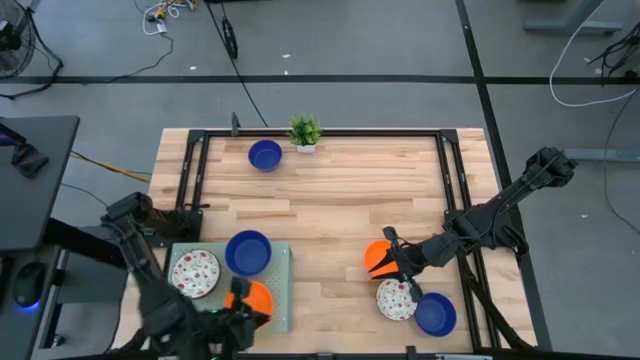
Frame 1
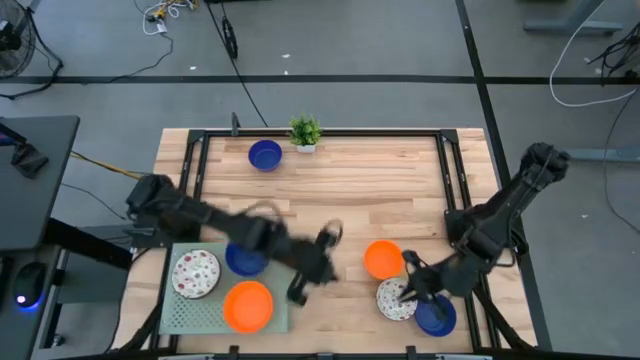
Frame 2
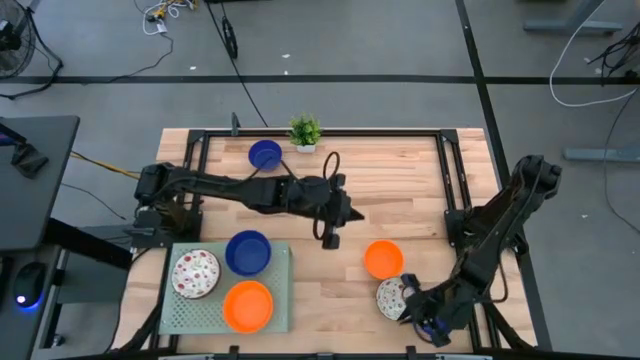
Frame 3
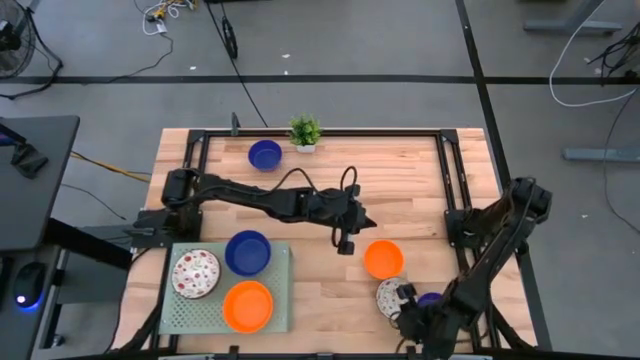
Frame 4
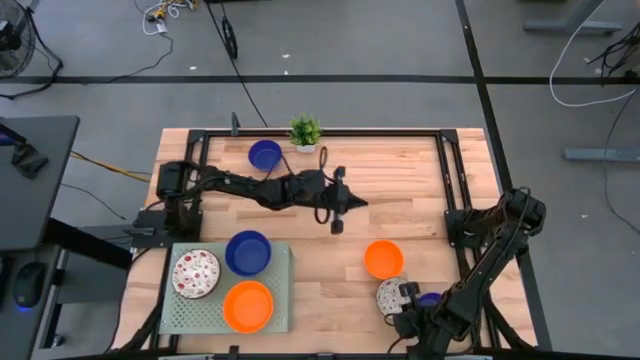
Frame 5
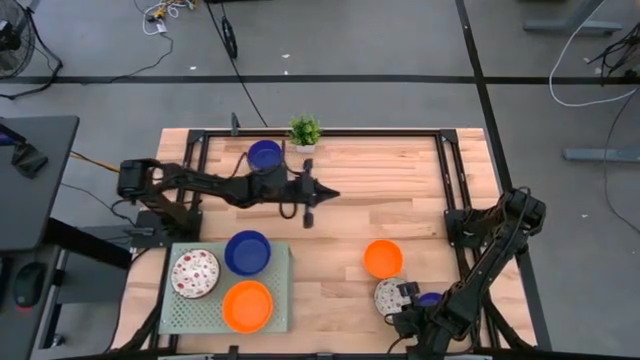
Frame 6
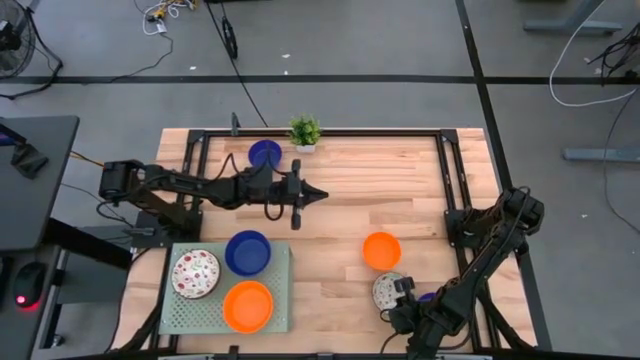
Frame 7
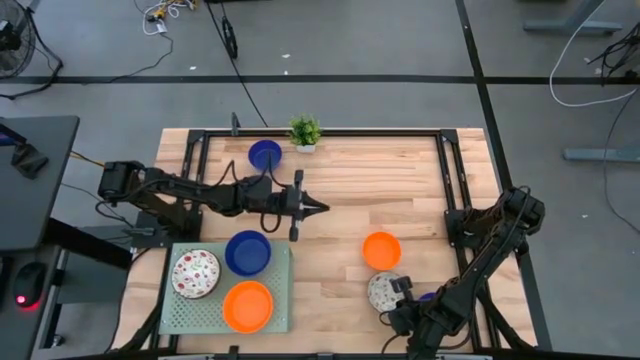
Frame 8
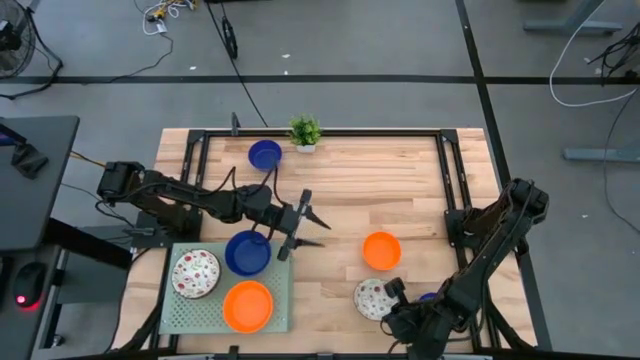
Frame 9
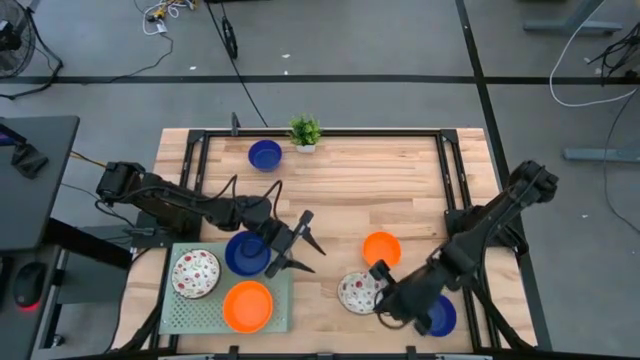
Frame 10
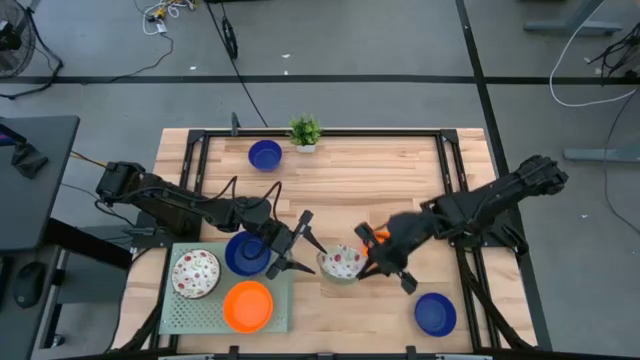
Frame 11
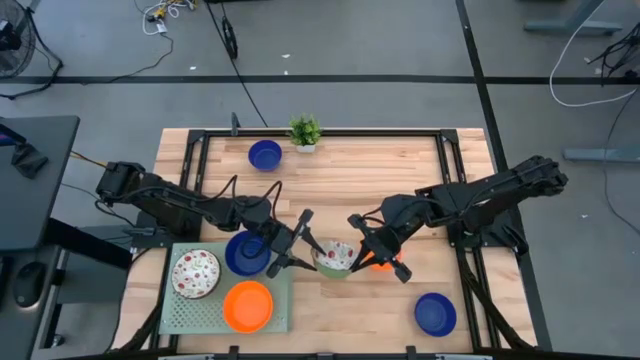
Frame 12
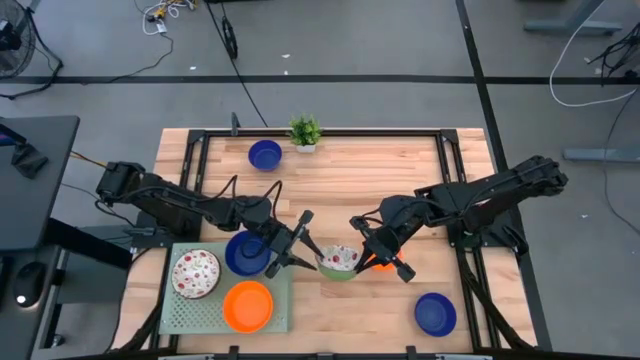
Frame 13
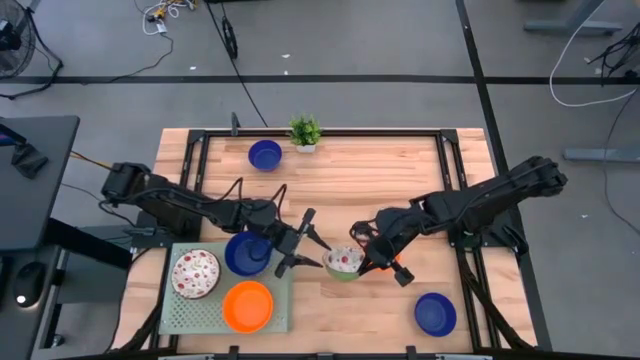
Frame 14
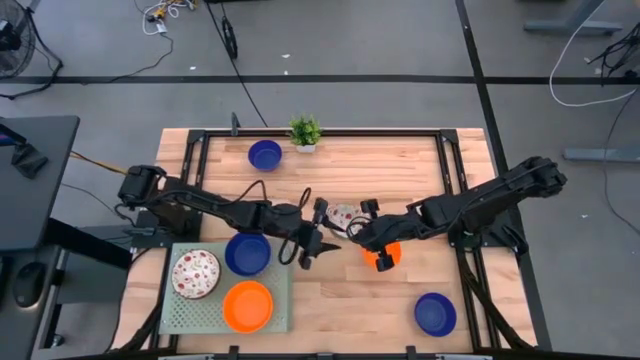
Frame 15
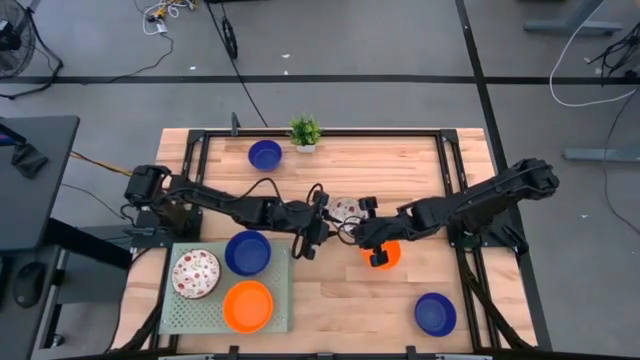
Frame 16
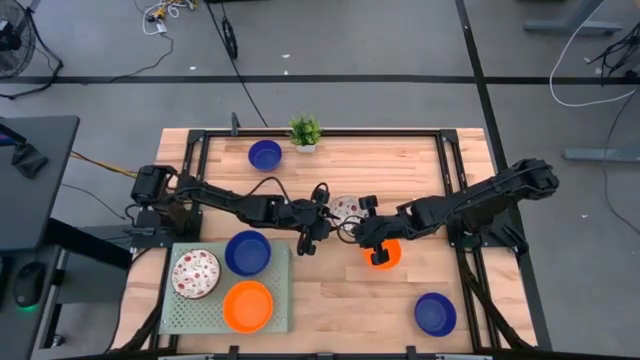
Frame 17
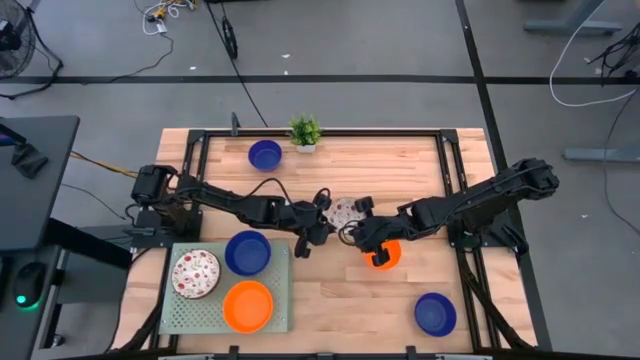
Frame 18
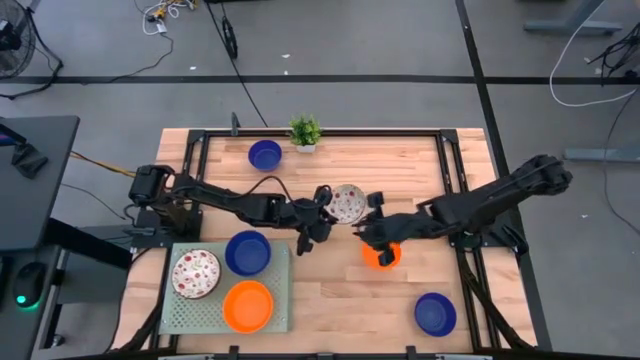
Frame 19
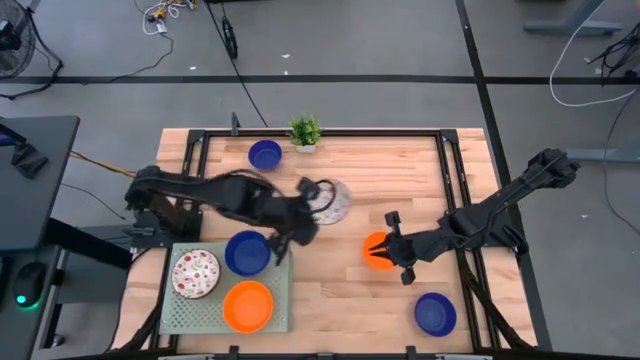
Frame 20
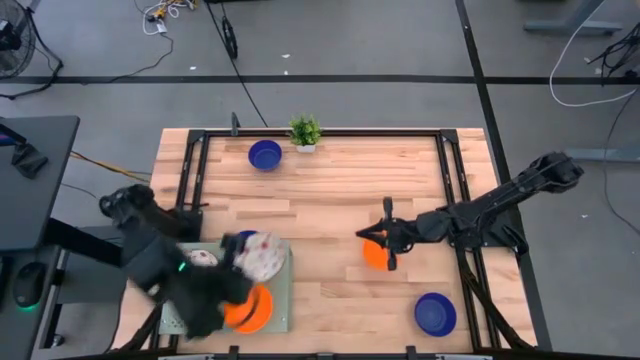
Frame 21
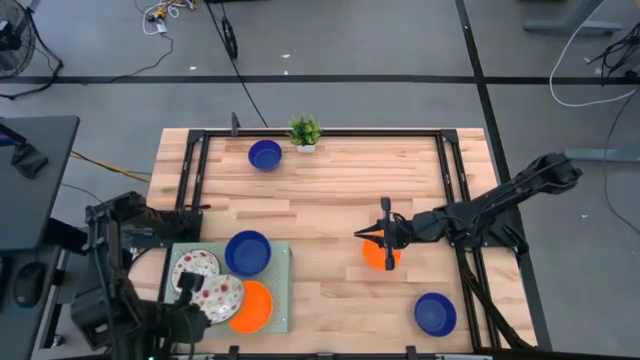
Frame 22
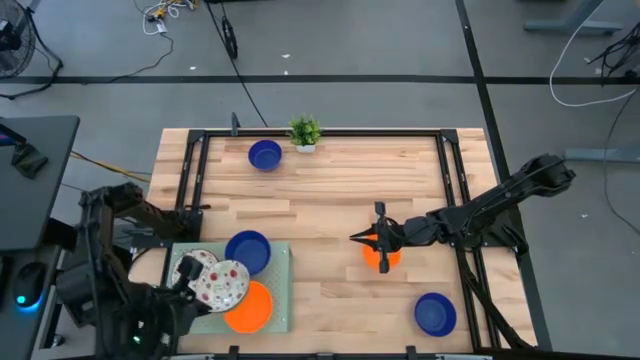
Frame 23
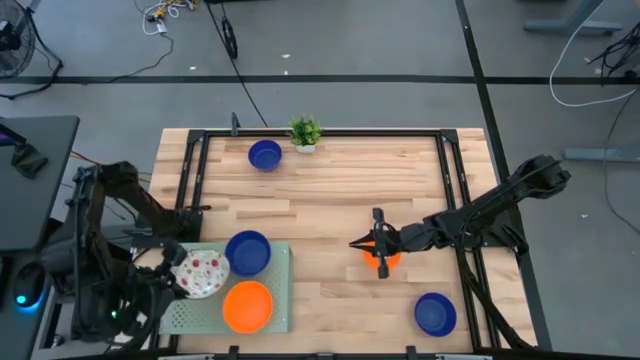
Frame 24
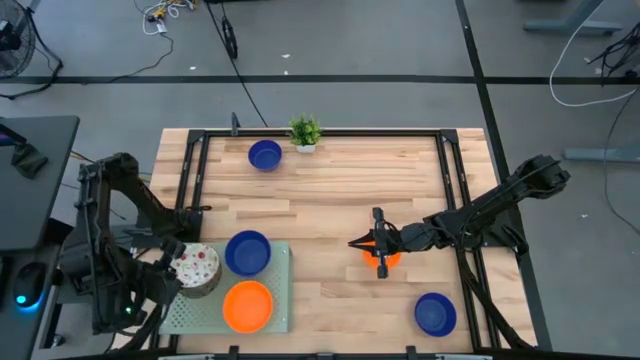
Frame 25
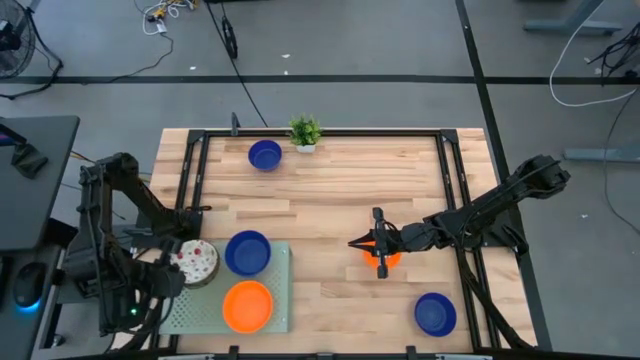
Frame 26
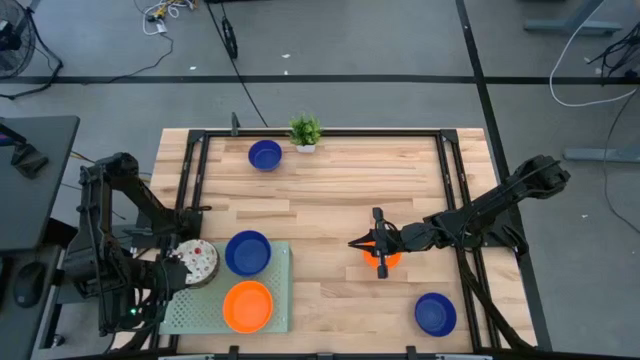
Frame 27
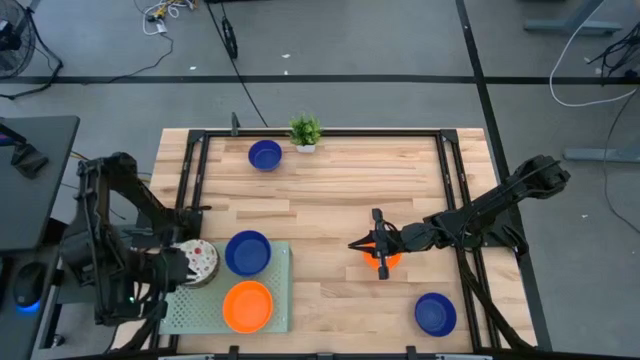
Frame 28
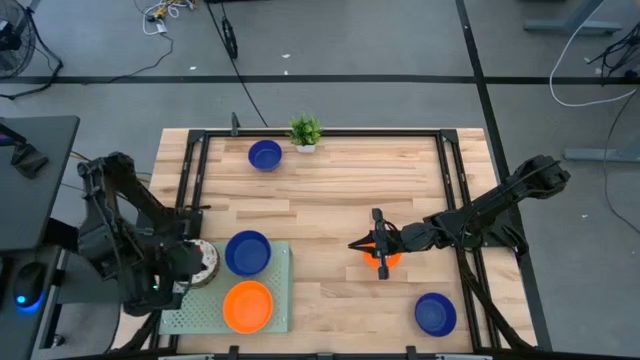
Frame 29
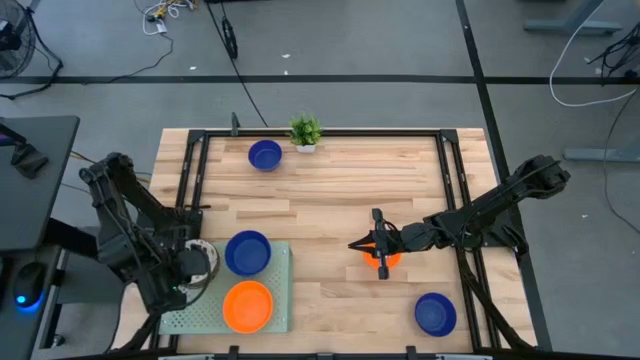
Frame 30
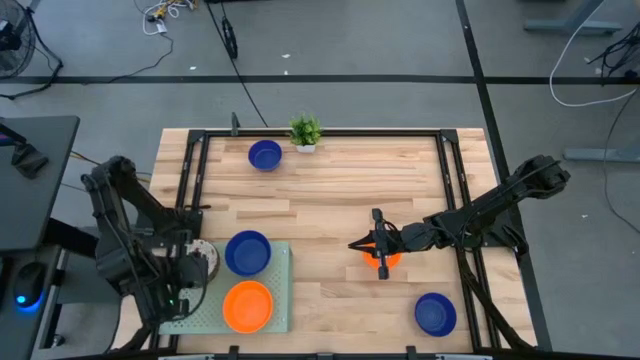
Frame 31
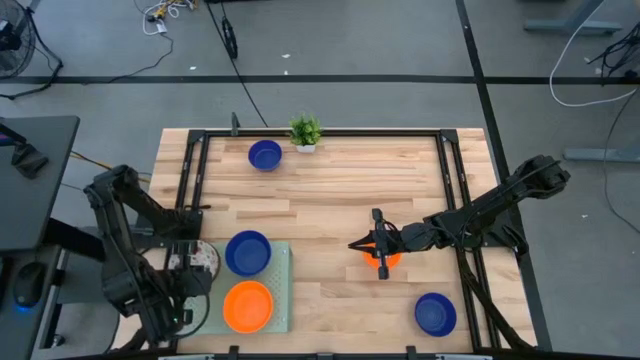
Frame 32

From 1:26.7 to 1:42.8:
Task: Pick & Place Mini bowls
Stack the white bowl on top of the stacked white bowls on the shelf

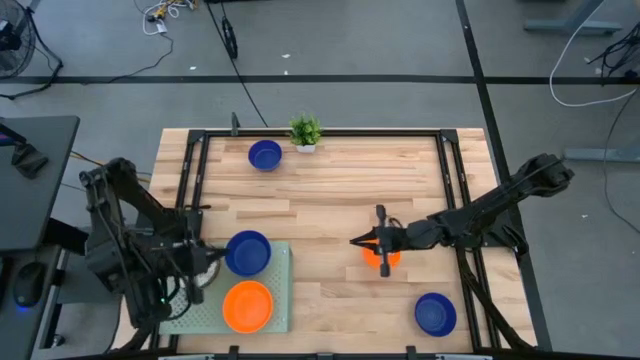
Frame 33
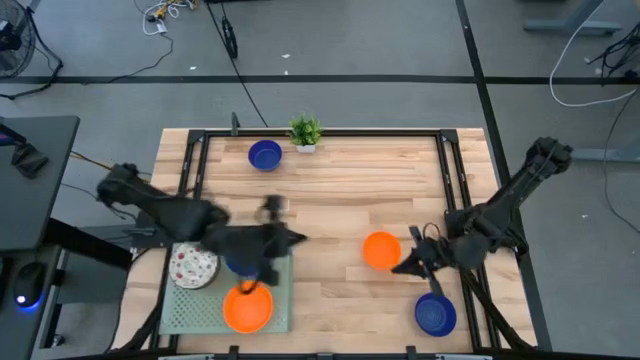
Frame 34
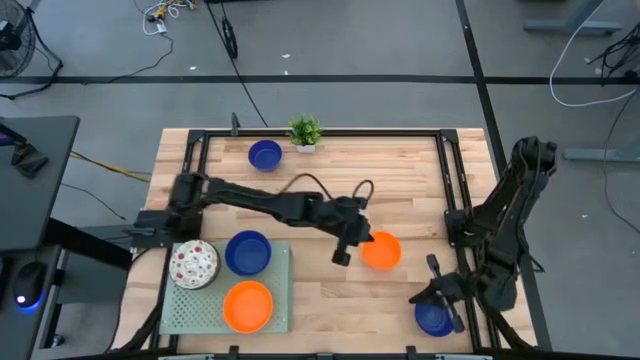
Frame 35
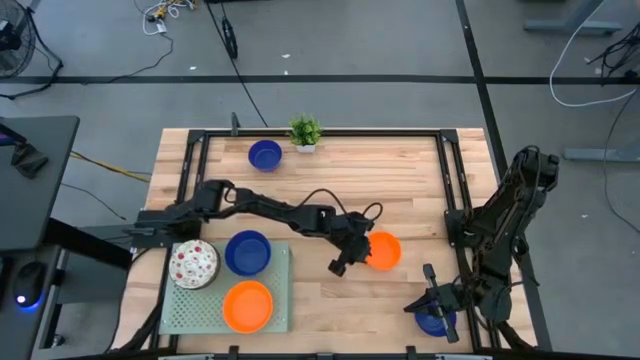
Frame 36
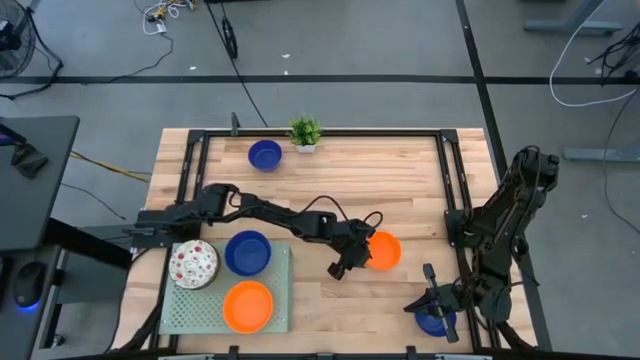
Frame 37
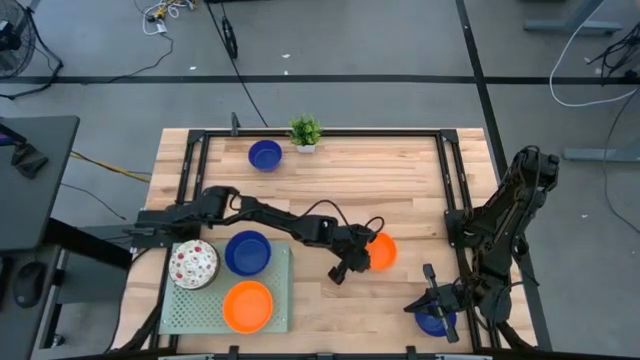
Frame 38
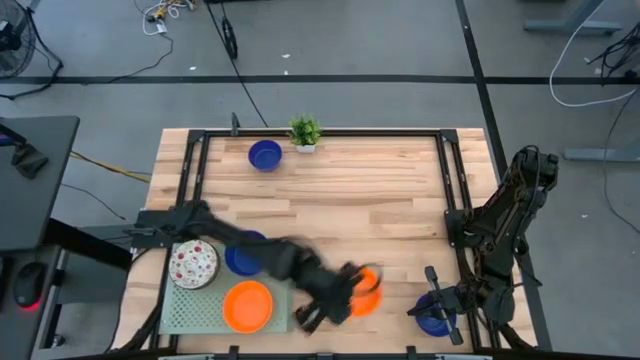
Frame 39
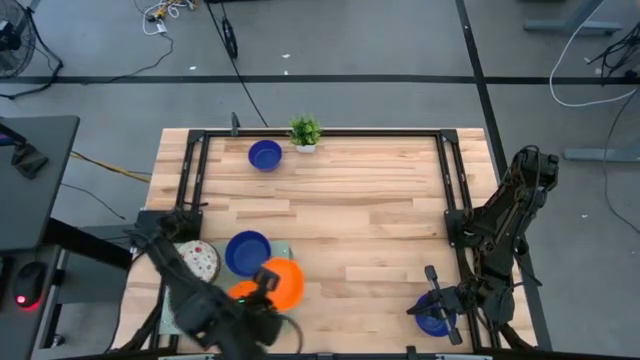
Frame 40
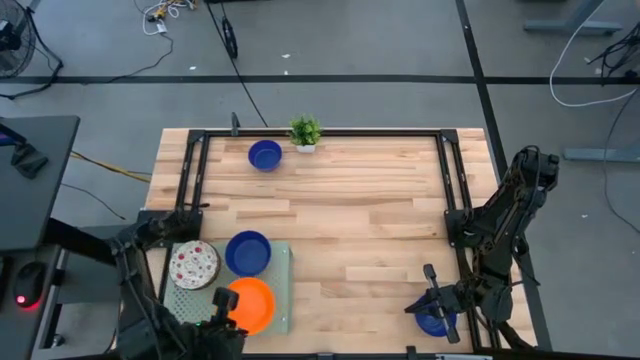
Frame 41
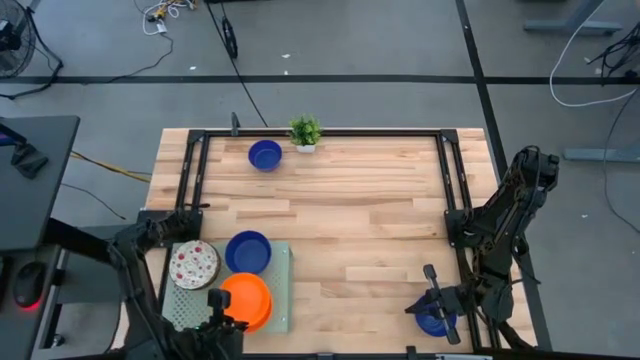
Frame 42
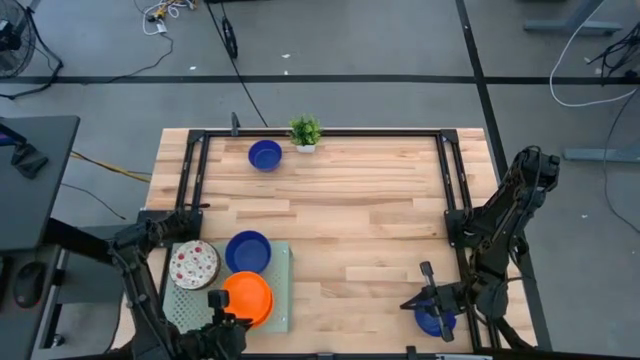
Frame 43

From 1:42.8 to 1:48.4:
Stack the orange bowl on top of the stacked orange bowl on the shelf

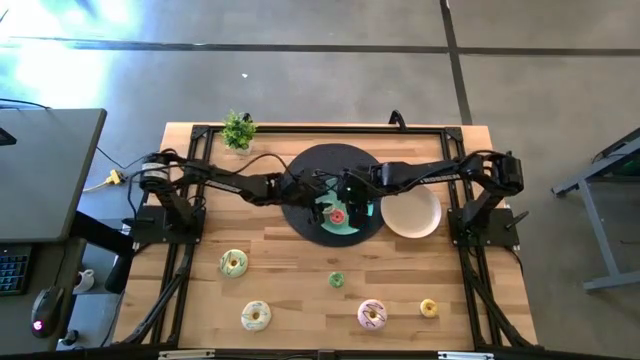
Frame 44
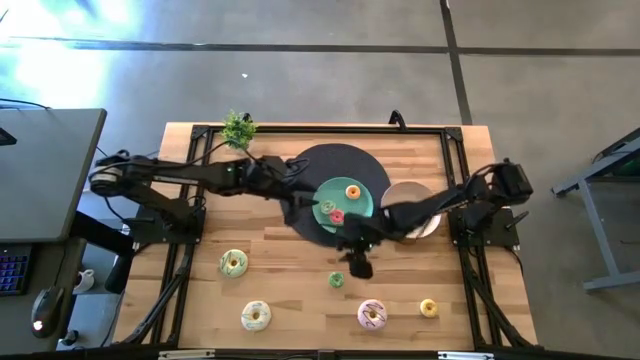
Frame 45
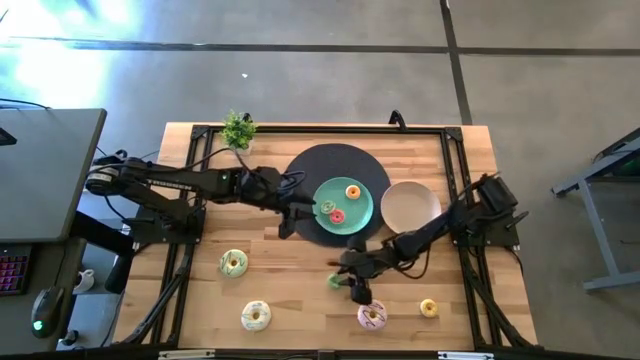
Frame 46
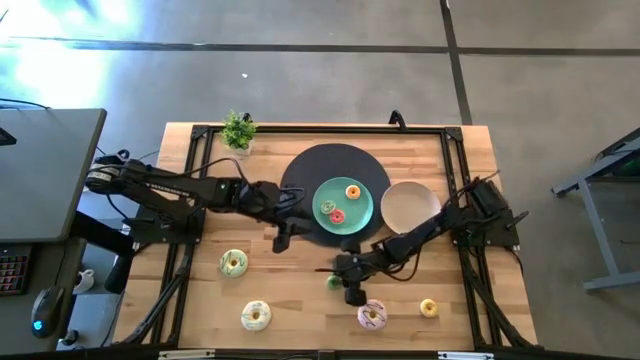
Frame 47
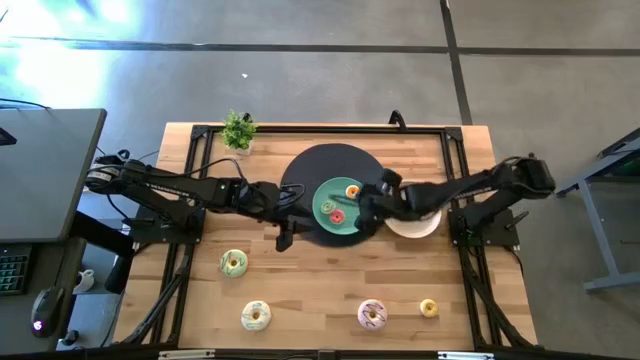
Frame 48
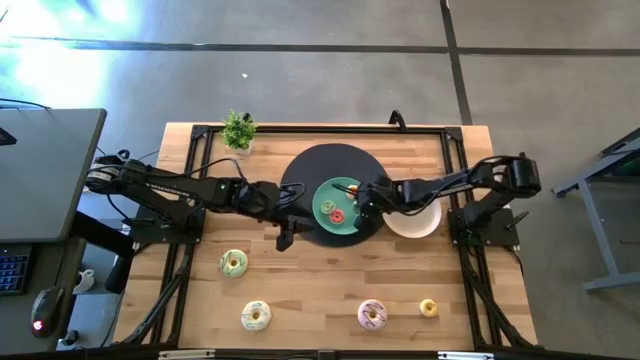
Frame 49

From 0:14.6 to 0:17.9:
Task: Pick & Place donuts
Put the small green donut into the blue plate
